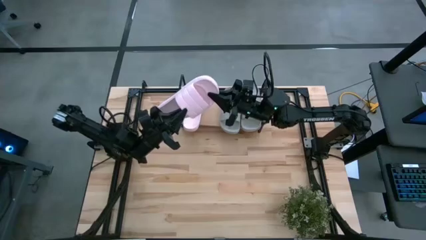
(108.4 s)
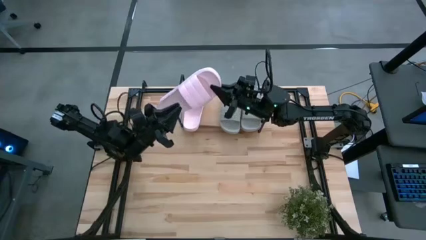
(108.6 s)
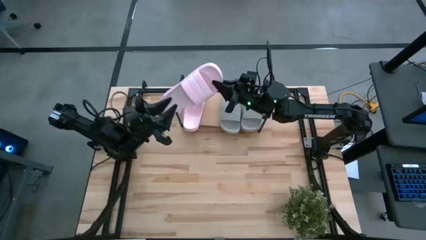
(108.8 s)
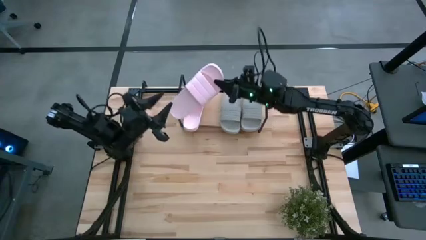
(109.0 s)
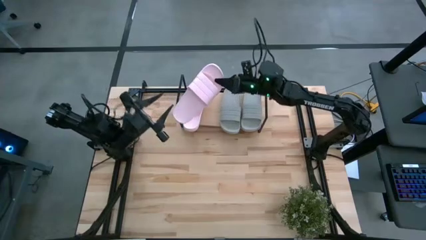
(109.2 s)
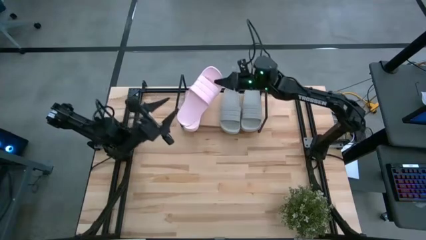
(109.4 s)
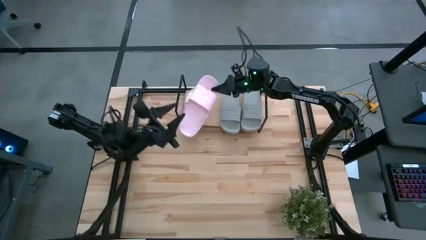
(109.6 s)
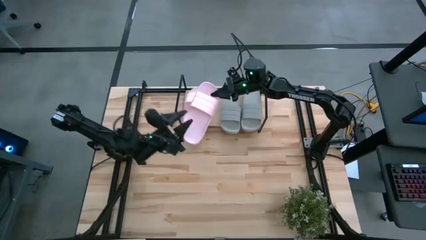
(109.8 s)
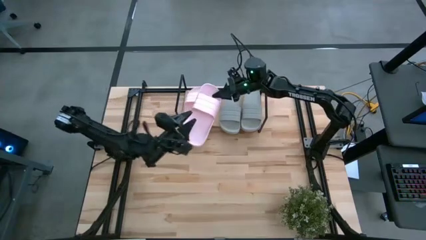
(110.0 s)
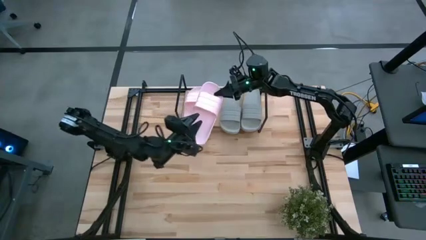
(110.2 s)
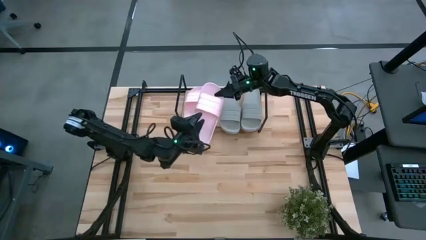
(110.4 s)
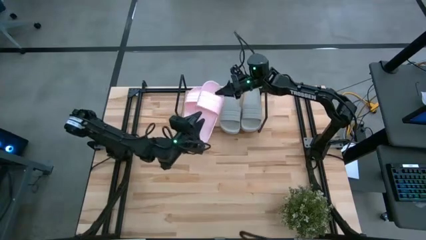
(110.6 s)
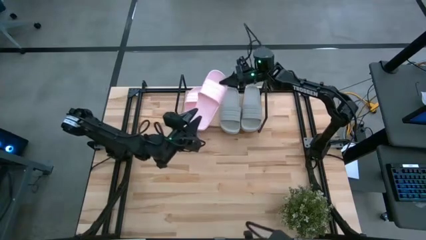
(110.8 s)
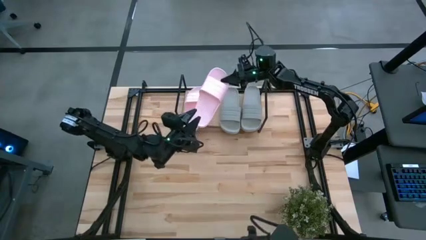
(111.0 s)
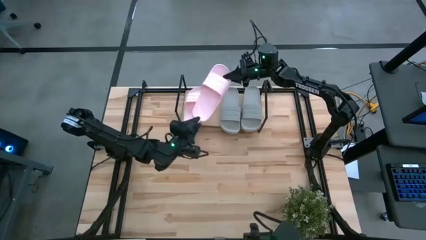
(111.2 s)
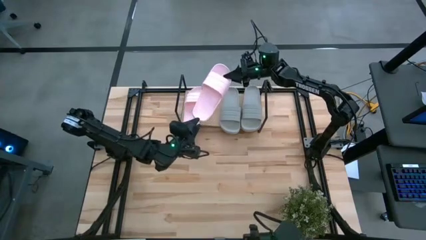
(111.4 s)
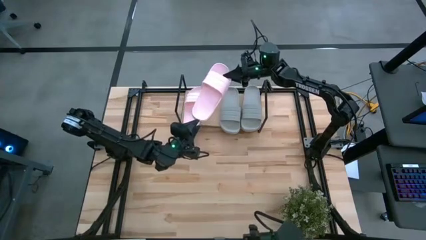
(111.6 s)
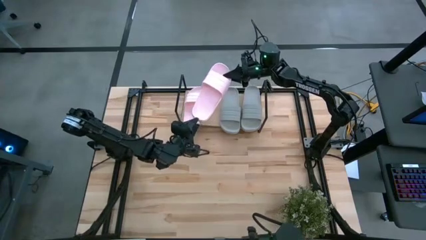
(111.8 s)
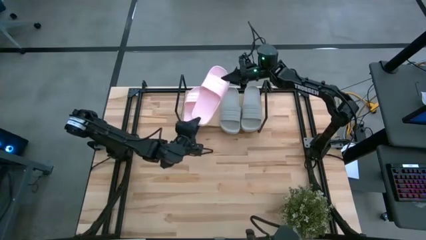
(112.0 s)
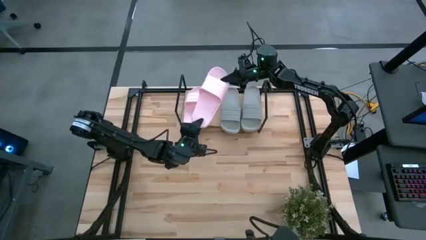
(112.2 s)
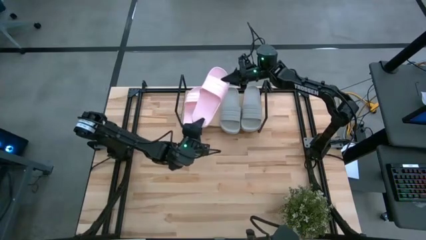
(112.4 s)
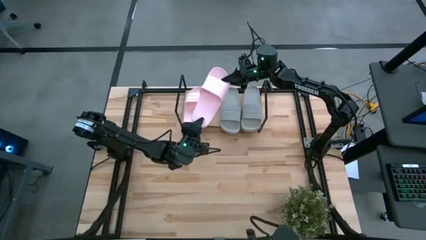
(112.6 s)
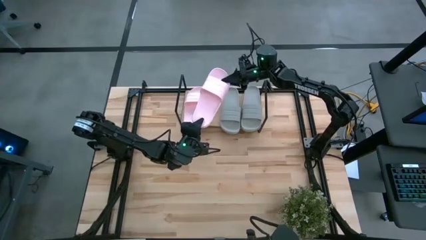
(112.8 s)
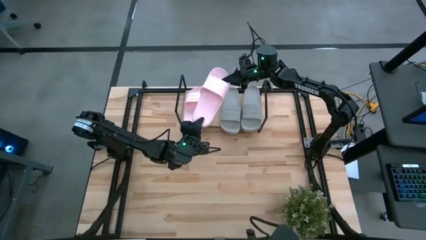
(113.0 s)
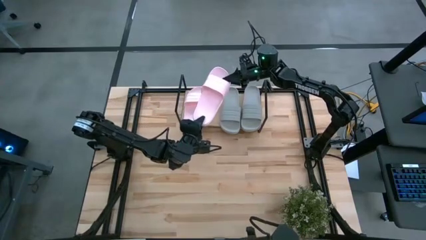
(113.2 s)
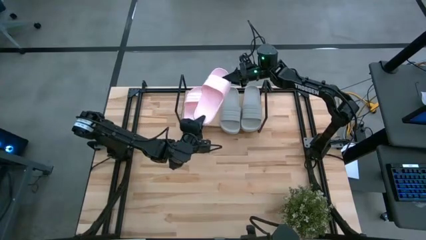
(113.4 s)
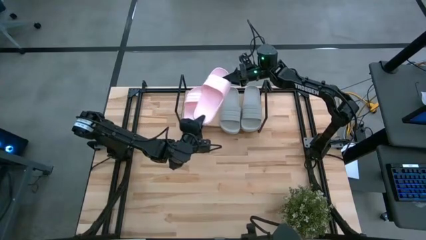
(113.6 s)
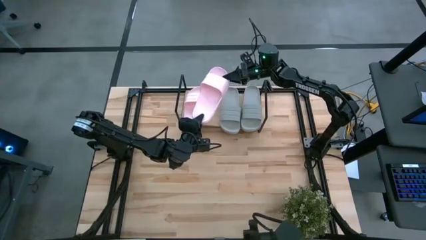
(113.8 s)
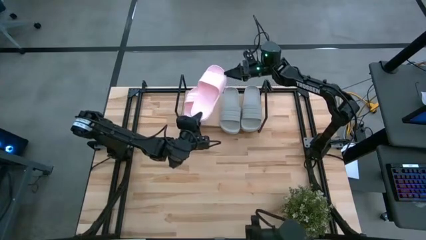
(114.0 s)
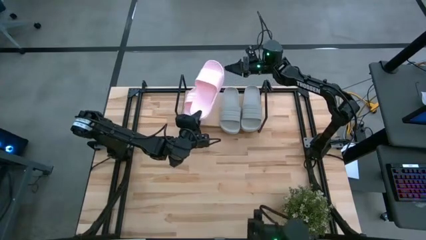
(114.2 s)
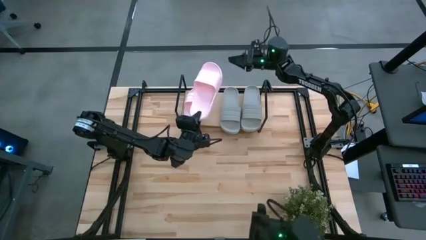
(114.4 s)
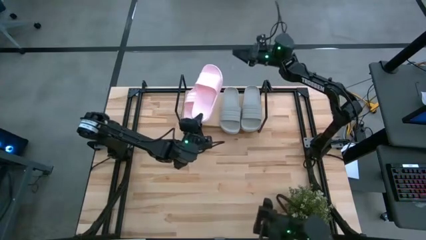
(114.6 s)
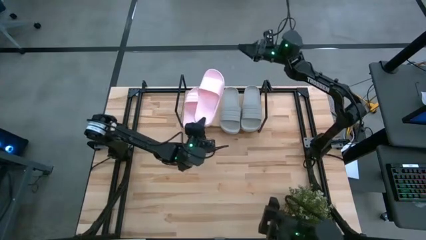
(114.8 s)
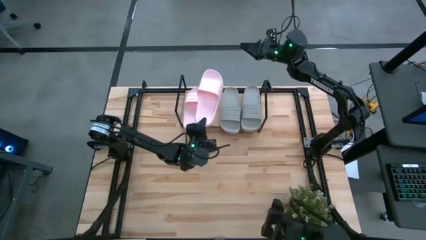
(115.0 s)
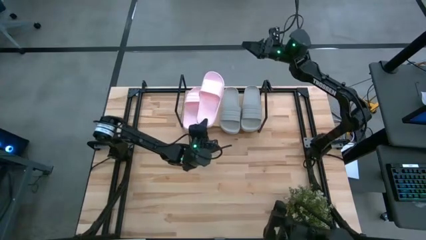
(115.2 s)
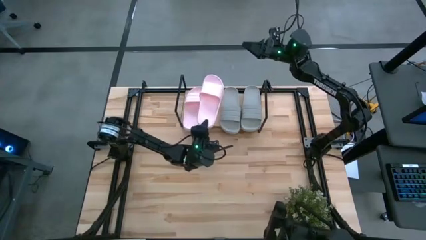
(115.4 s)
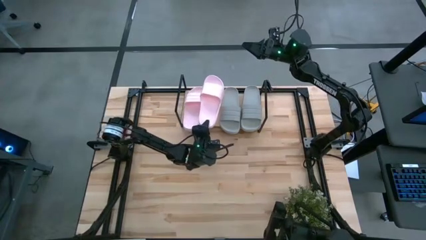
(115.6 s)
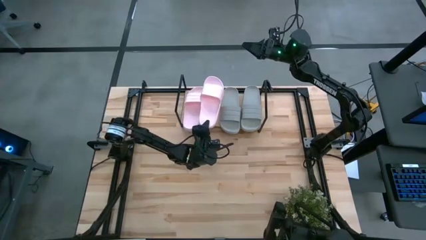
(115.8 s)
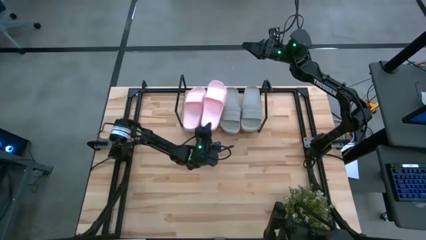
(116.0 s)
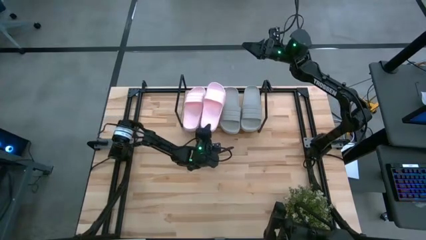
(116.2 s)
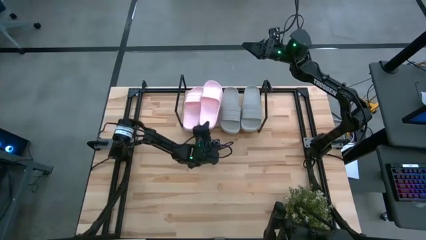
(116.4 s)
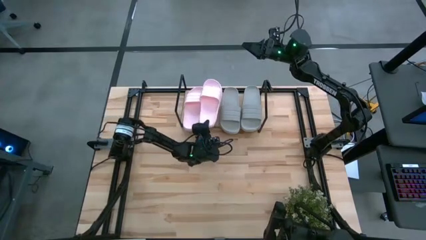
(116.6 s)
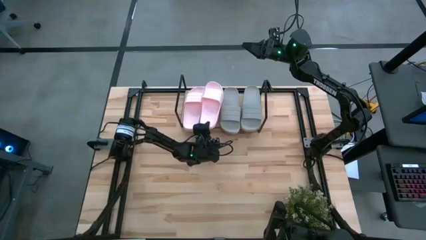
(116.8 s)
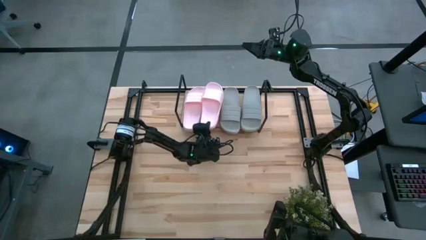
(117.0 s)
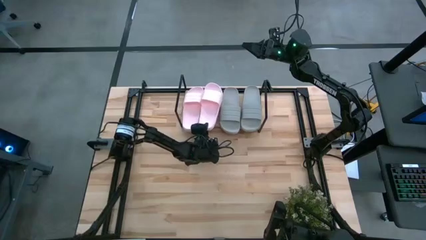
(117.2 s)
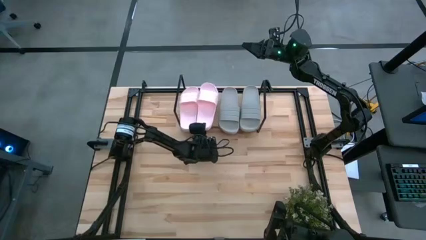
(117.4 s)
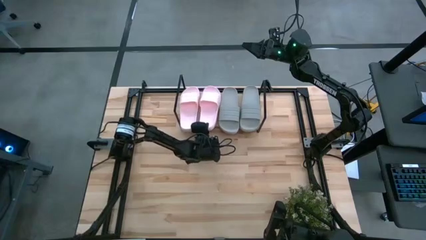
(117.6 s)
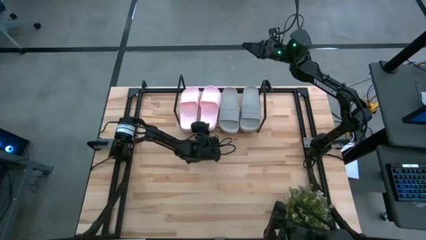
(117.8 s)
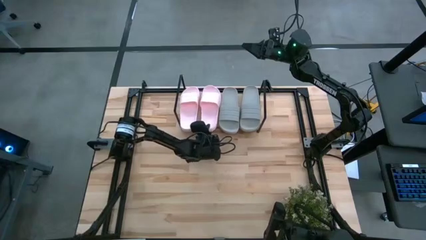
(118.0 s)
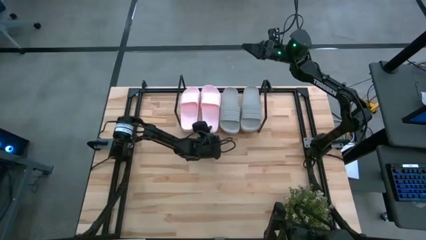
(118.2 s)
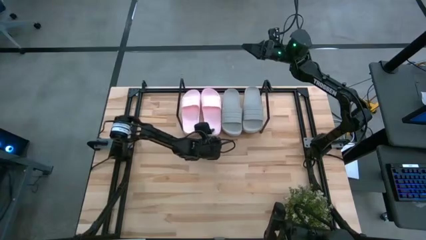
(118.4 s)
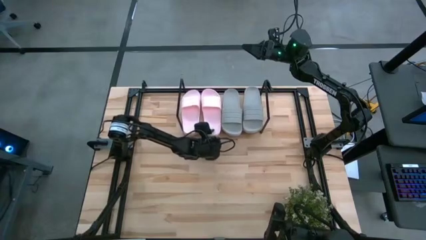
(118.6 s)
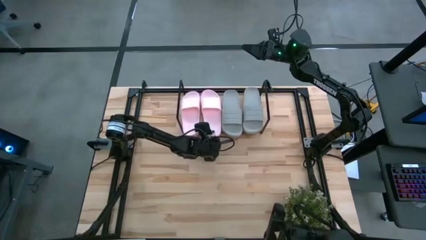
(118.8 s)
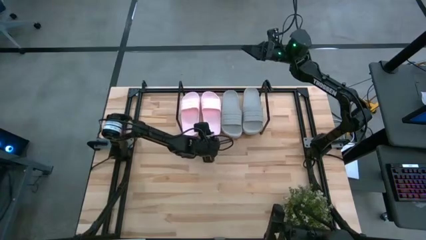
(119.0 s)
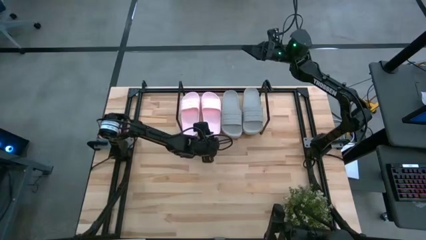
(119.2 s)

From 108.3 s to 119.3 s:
Task: Pick and place slides into the shelf
Put the pink slipper on the shelf

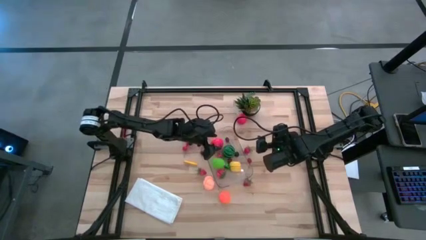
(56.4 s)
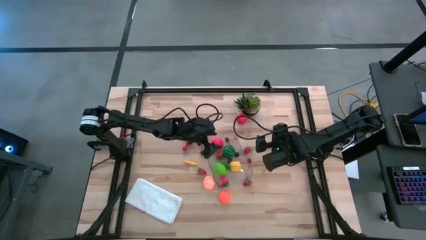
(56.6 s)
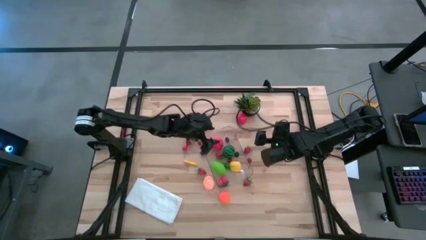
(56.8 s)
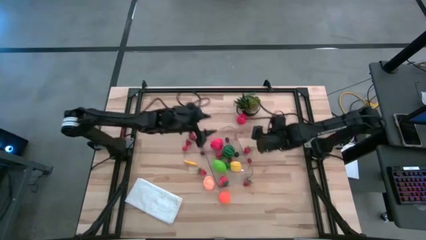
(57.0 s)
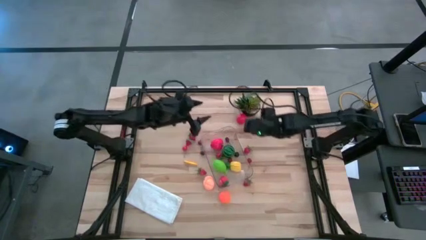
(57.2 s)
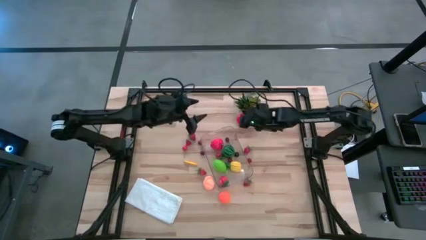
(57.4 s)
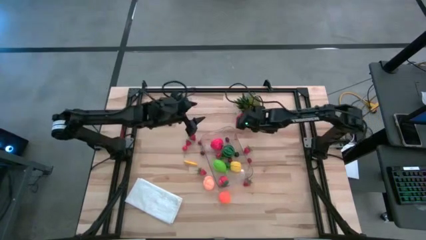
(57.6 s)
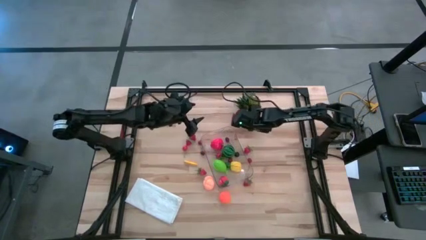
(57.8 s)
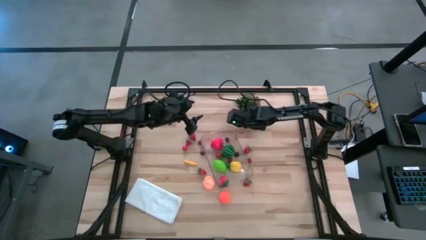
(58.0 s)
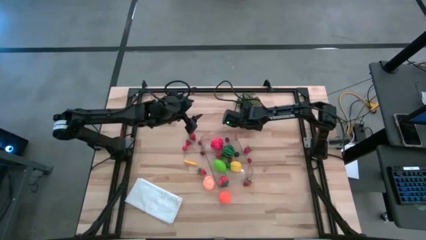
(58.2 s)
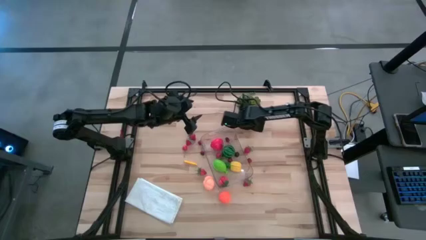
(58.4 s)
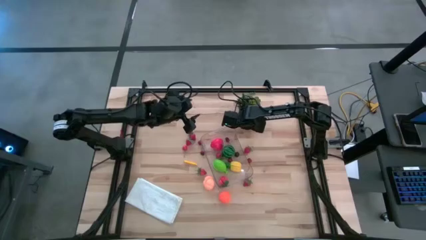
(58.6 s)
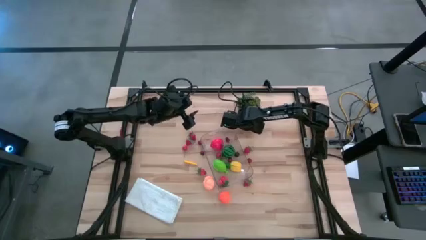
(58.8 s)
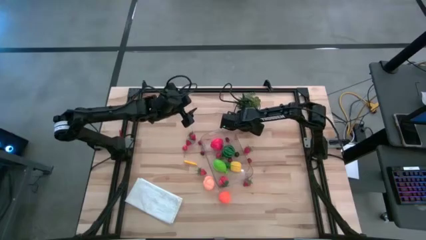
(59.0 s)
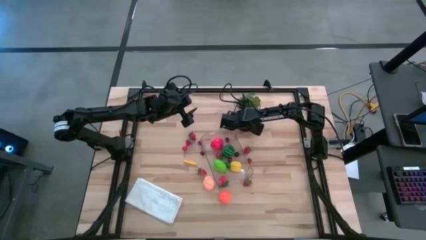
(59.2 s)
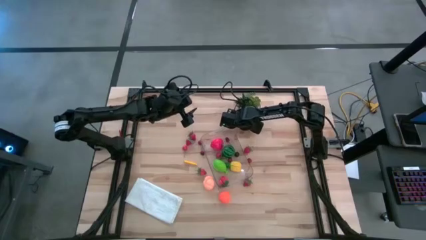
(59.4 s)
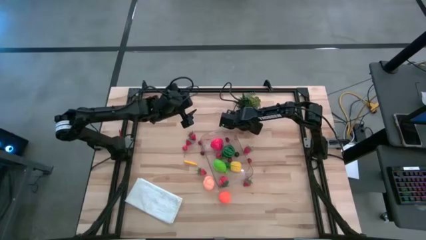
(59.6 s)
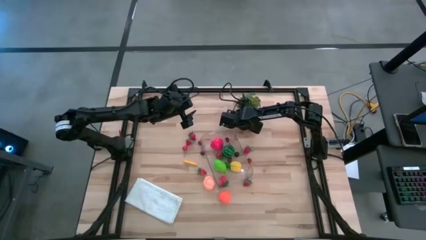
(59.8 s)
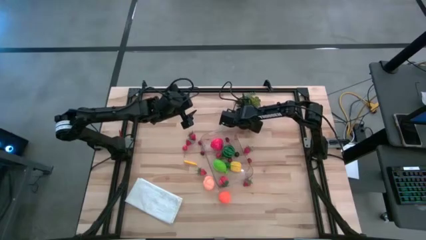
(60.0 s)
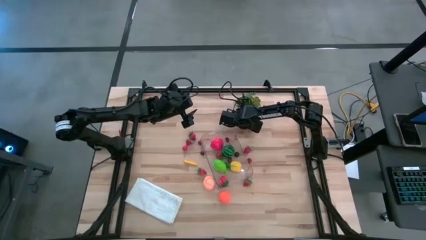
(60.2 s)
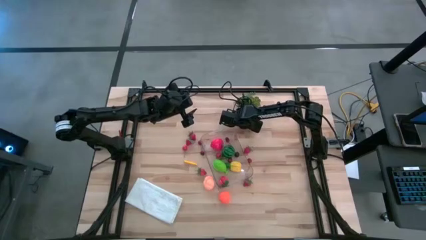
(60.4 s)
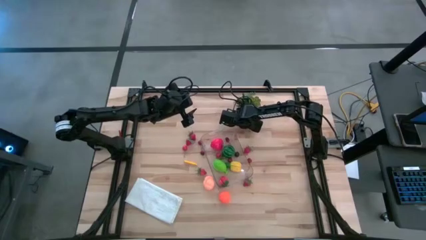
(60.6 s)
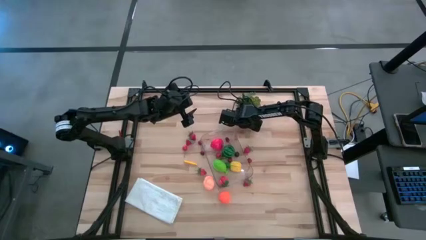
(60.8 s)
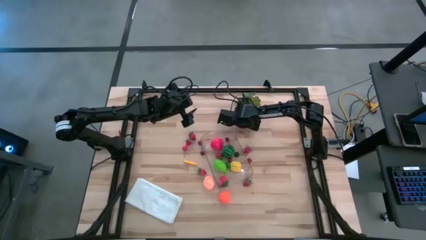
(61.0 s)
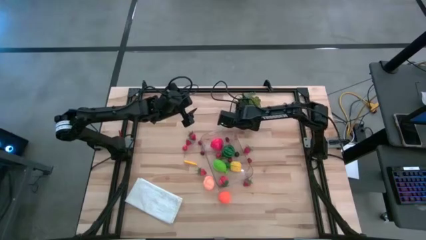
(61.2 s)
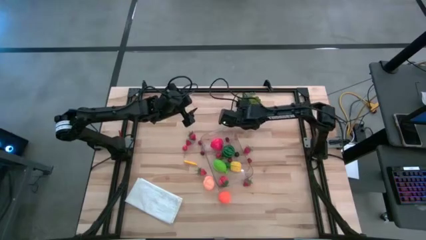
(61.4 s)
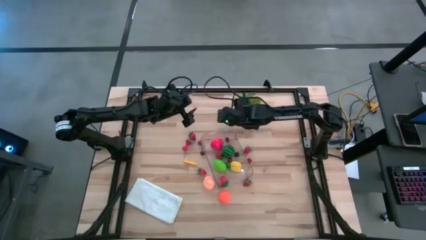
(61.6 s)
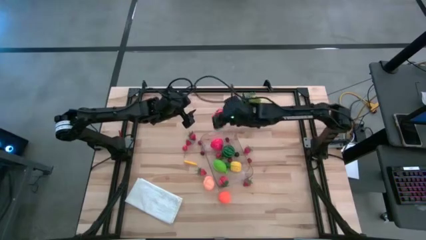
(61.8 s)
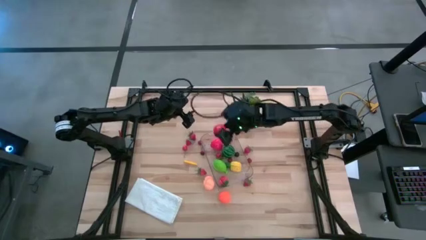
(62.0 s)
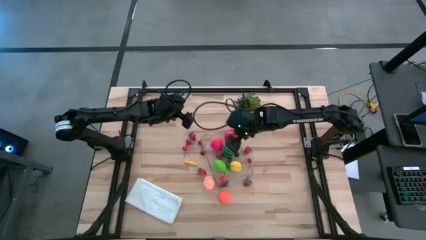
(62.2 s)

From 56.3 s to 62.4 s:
Task: Pick and placing Produce into tupperware
Put the red tomato into the transparent bin
